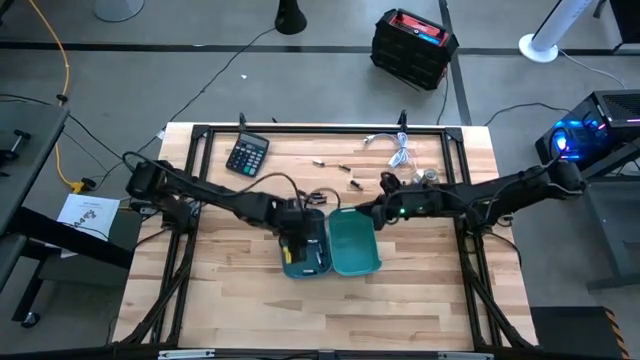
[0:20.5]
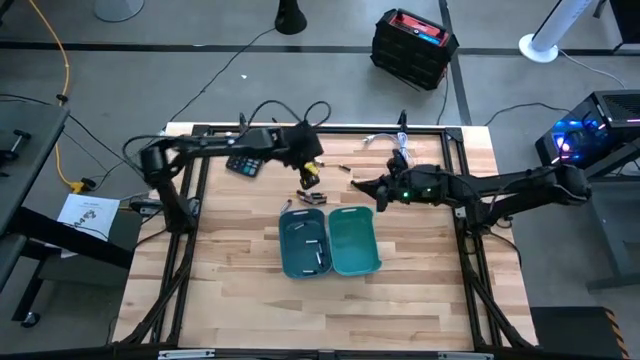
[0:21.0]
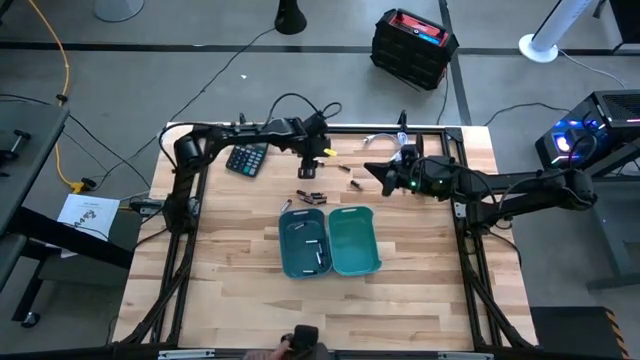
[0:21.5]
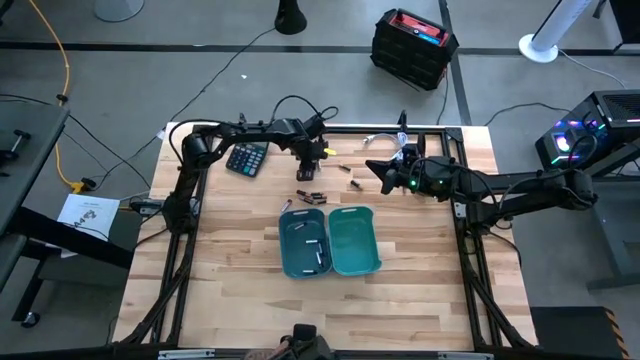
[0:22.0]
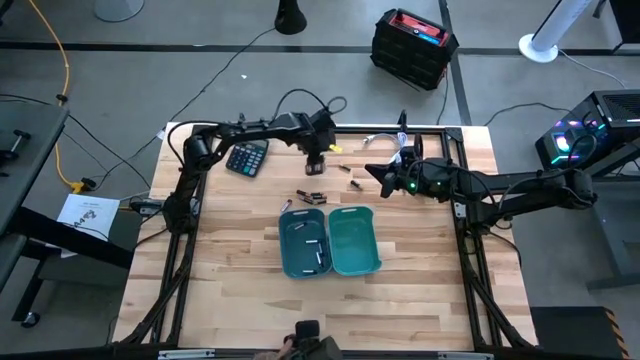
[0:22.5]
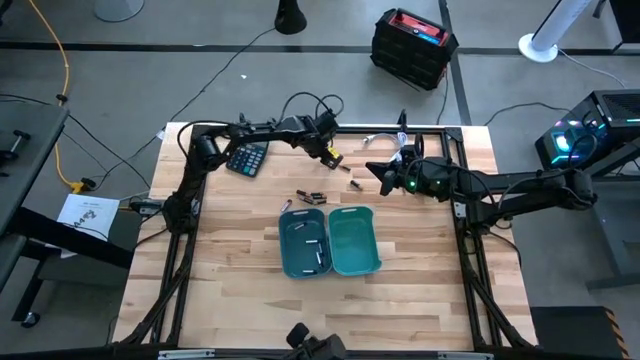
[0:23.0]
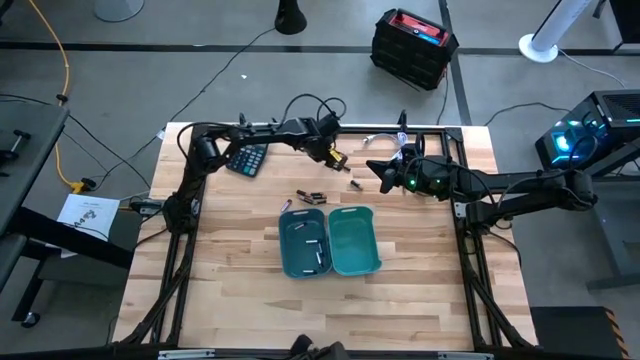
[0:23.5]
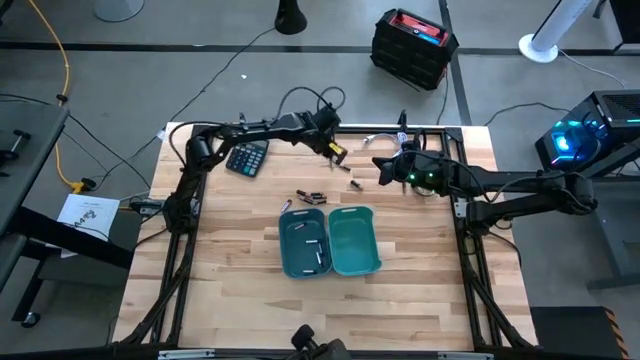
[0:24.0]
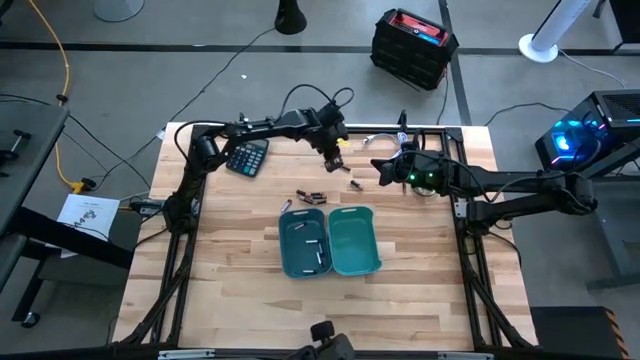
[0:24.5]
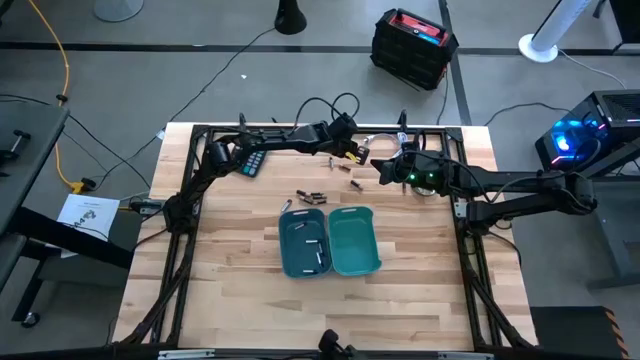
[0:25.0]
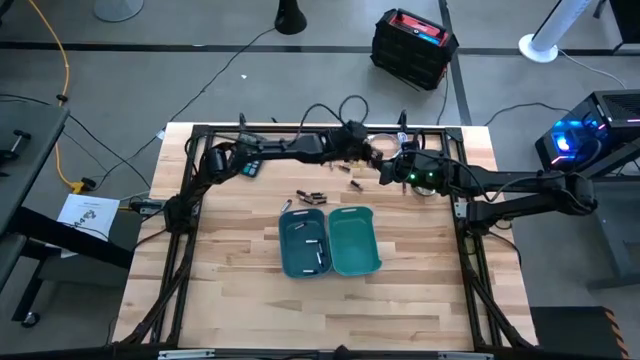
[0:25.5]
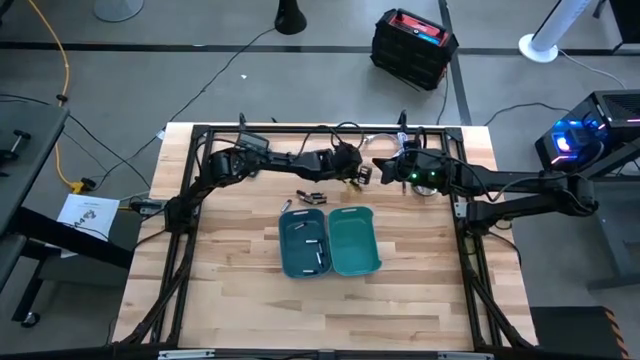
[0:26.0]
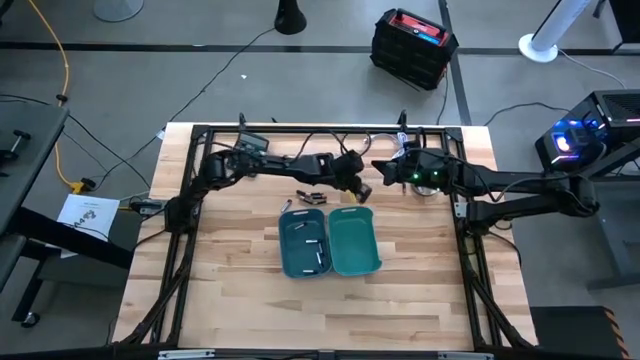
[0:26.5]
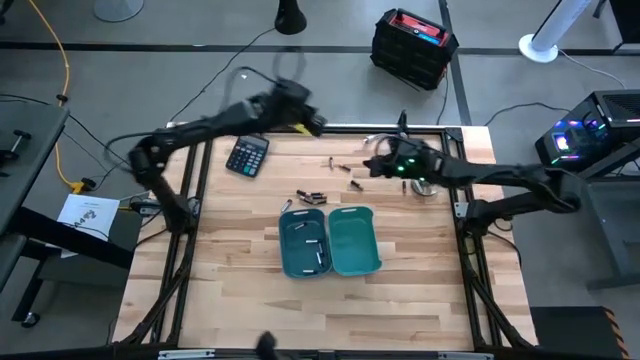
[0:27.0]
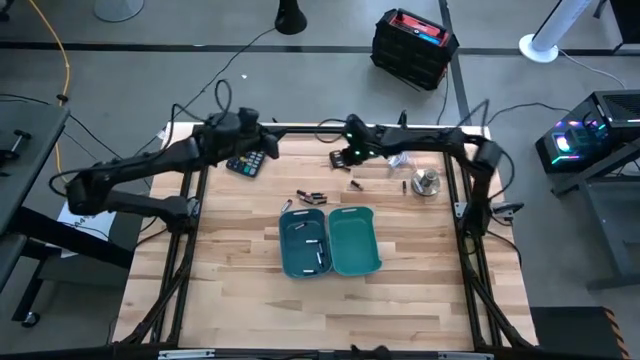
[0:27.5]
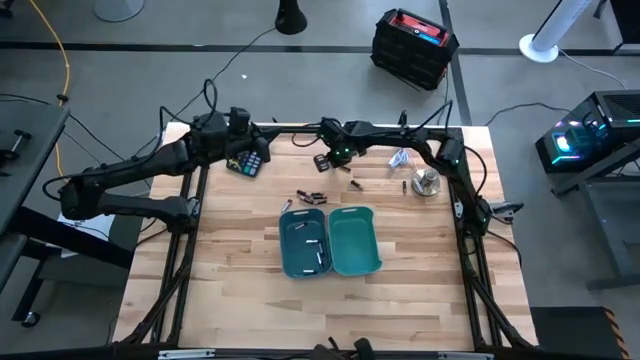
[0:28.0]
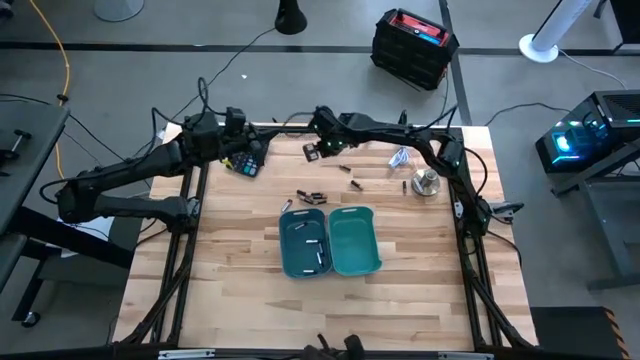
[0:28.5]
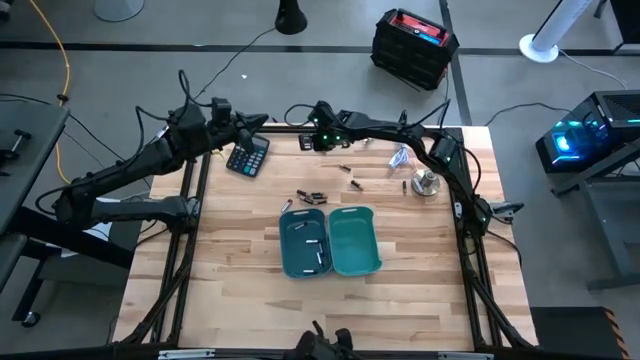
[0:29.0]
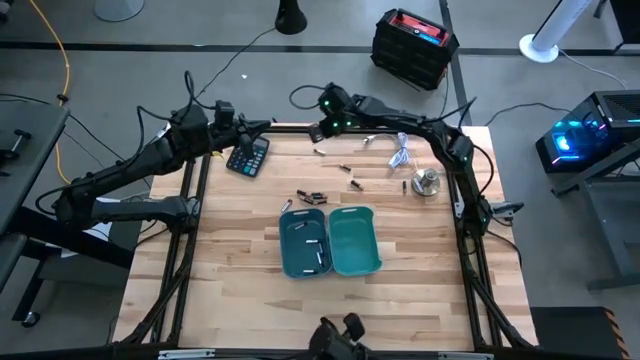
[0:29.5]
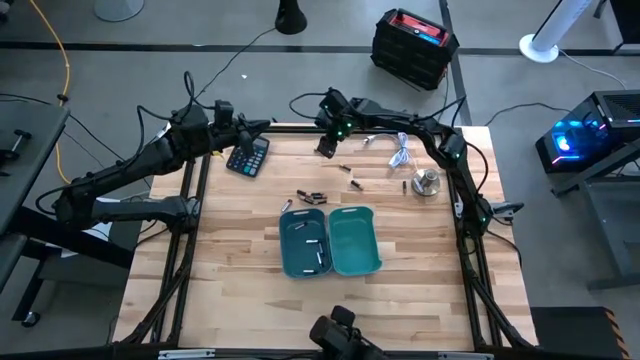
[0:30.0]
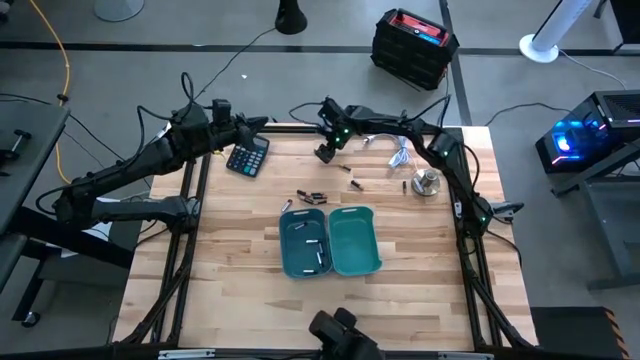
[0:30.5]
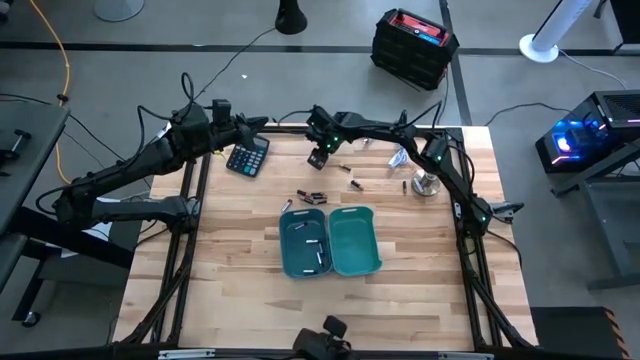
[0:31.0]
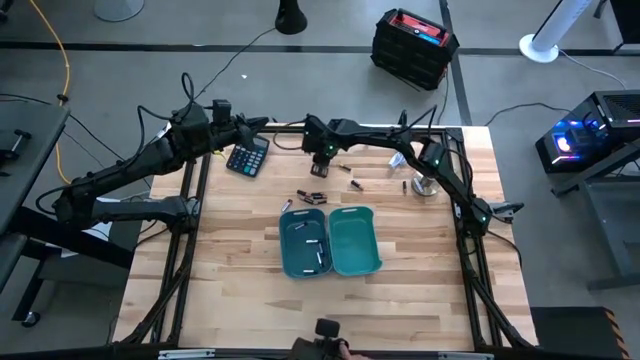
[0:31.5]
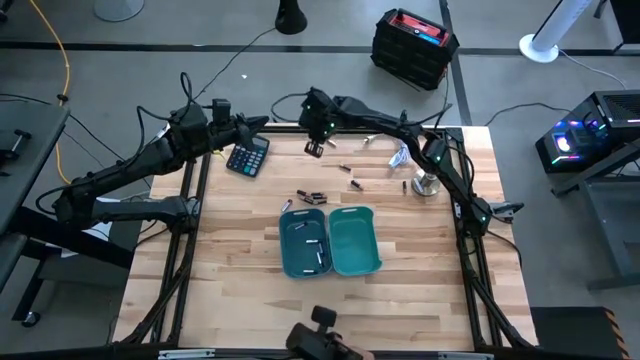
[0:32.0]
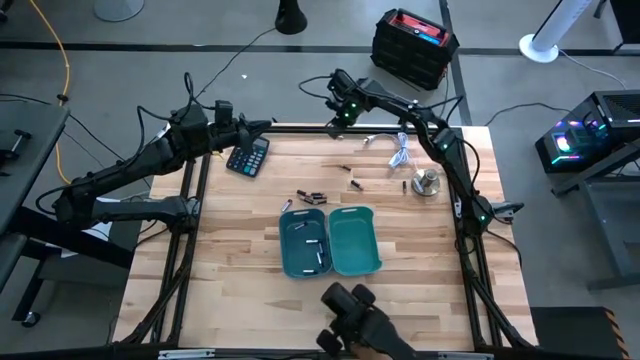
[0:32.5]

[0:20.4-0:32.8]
Task: Sort batteries
Put the silver battery into the blue bin

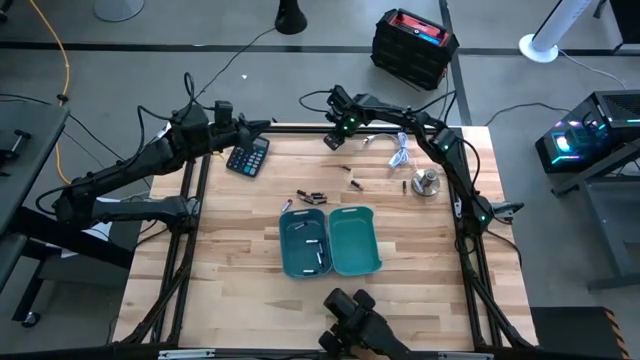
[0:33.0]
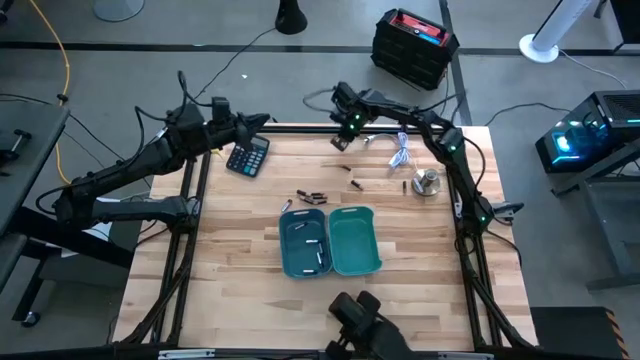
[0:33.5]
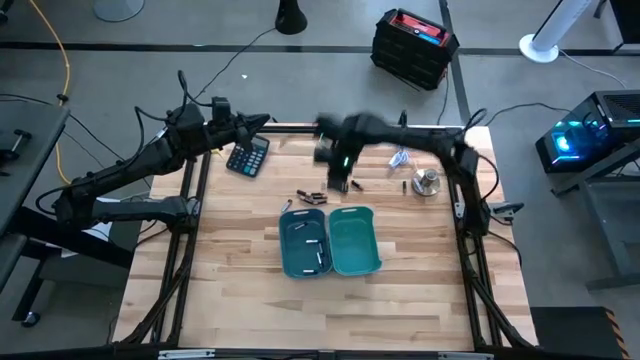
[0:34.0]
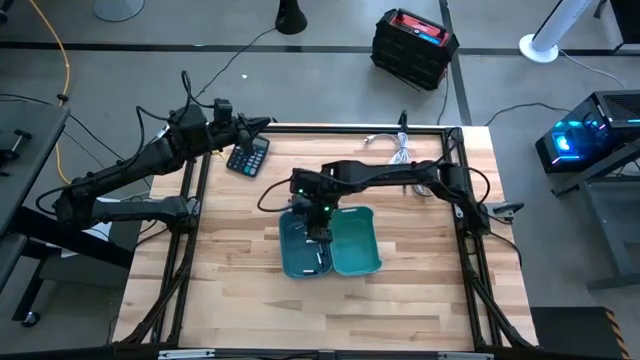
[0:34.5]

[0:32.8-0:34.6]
Put the silver battery into the blue bin

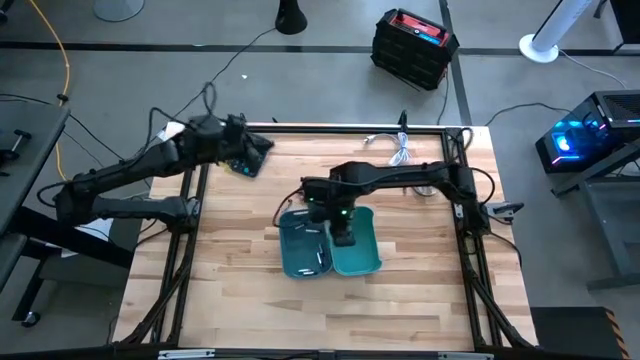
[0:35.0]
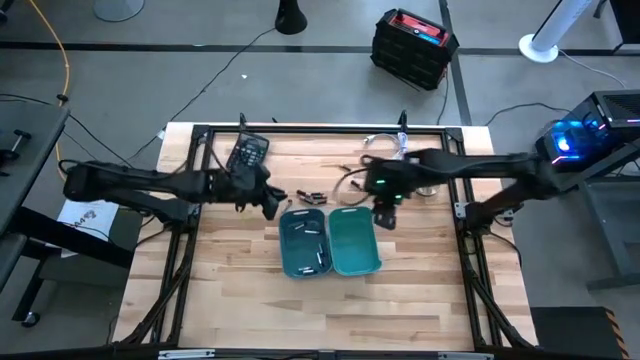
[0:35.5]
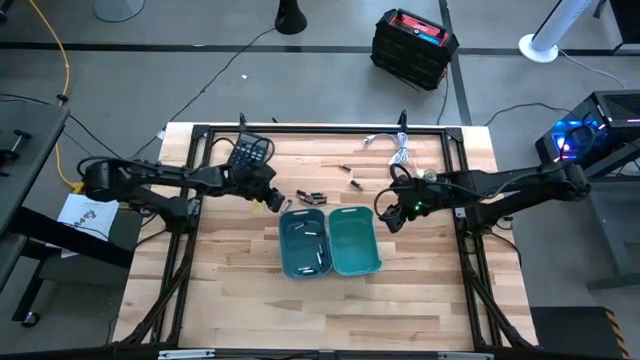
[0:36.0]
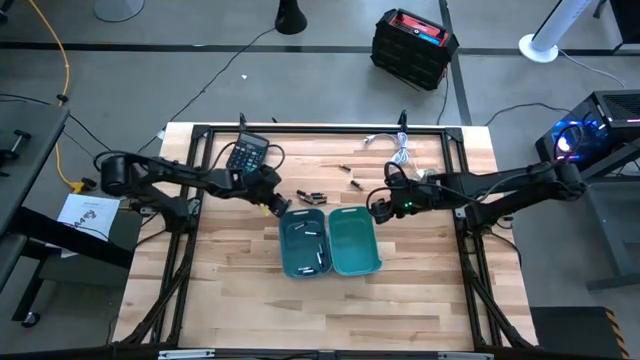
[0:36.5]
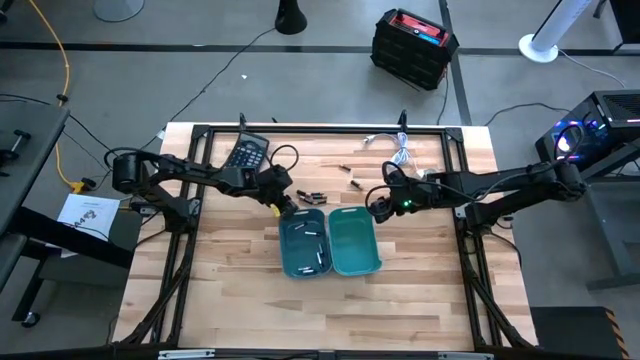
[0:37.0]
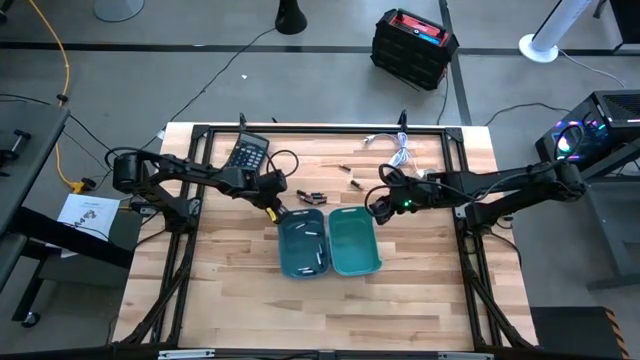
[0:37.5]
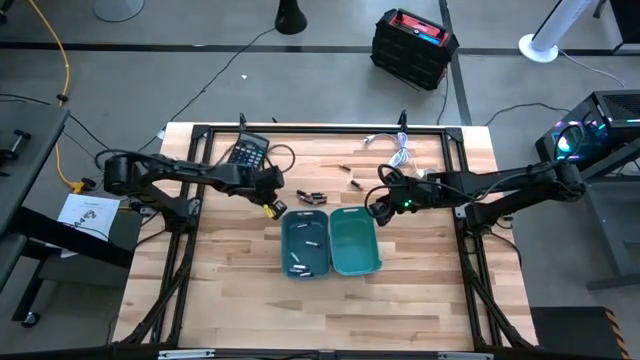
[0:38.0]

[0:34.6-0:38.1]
Put the silver battery into the blue bin

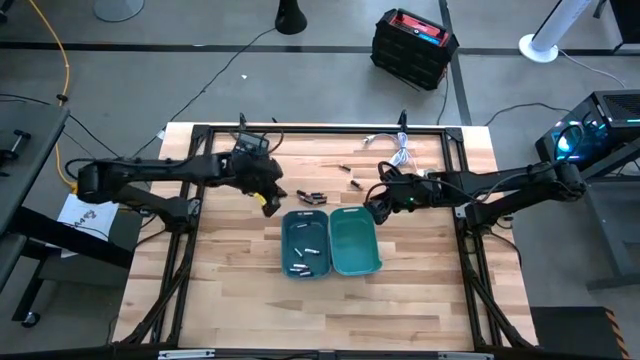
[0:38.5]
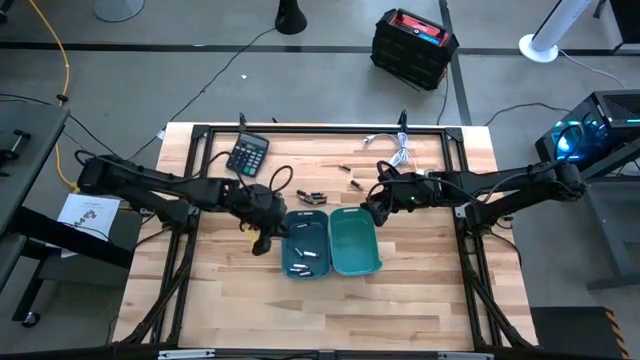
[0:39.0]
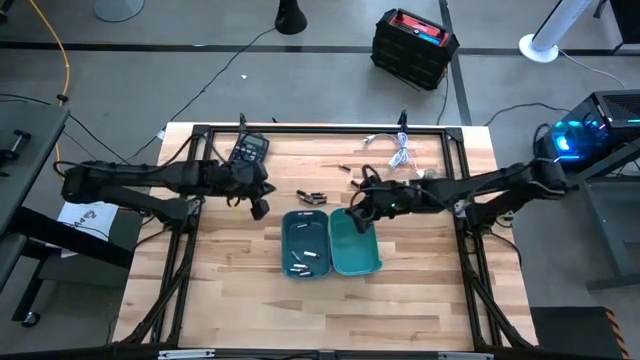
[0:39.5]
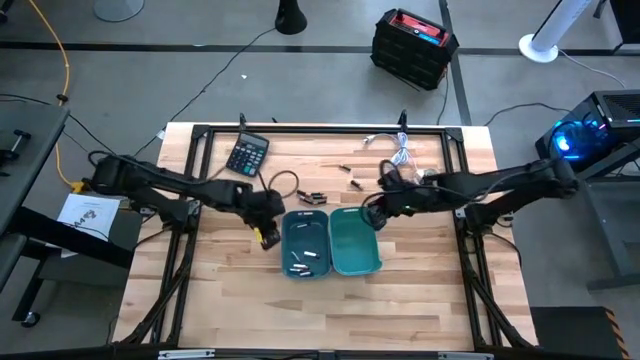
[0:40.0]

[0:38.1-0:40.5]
Adjust the bins to the right

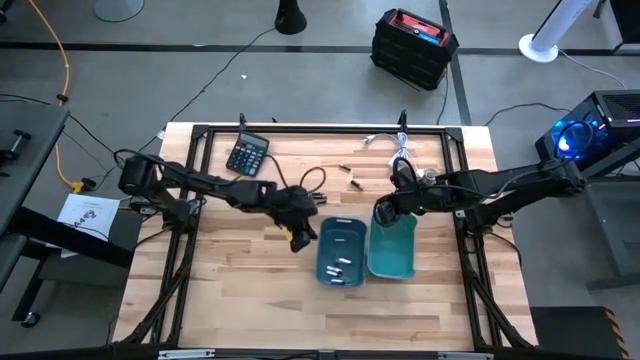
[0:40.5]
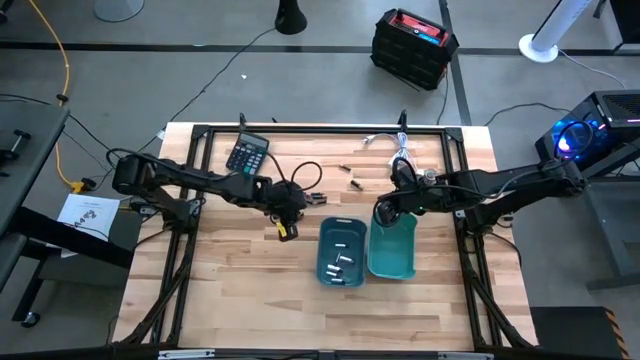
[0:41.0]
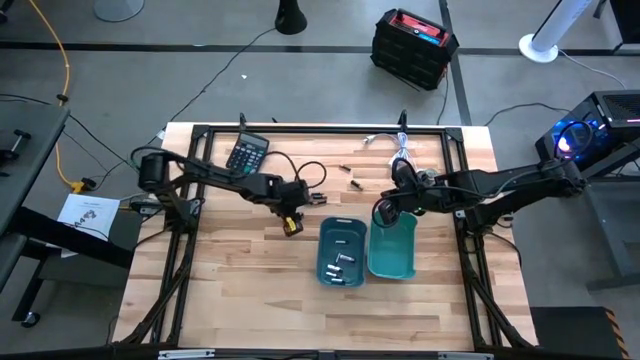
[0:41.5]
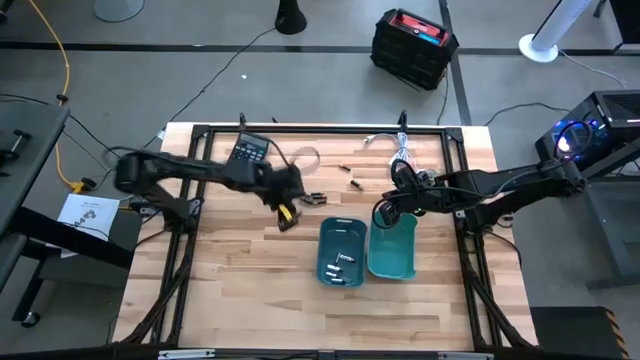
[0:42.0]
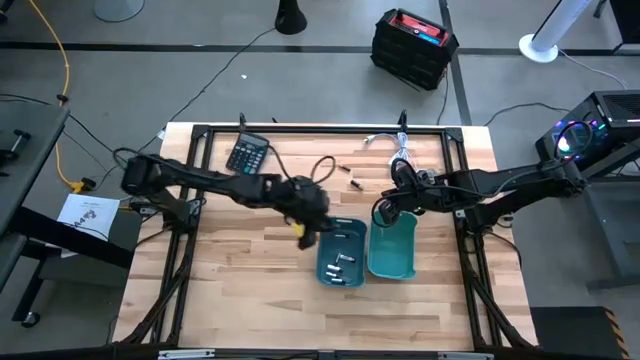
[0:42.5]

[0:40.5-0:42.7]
Put the silver battery into the blue bin
